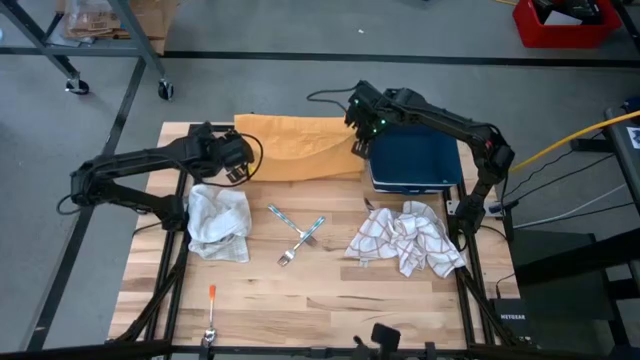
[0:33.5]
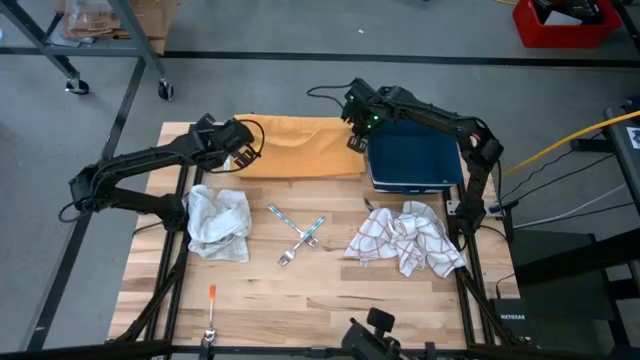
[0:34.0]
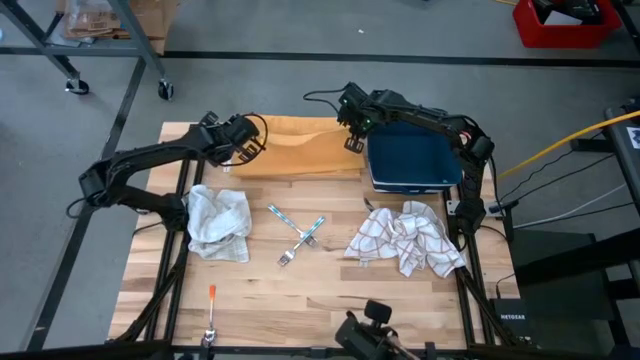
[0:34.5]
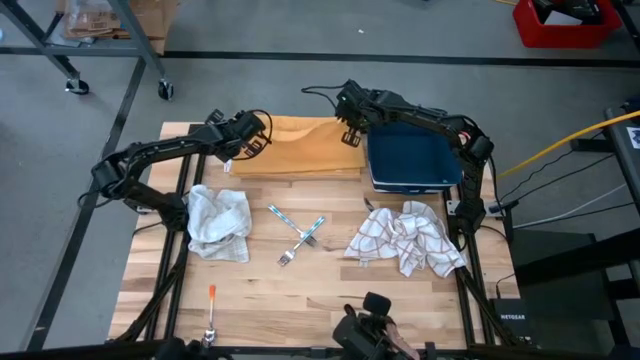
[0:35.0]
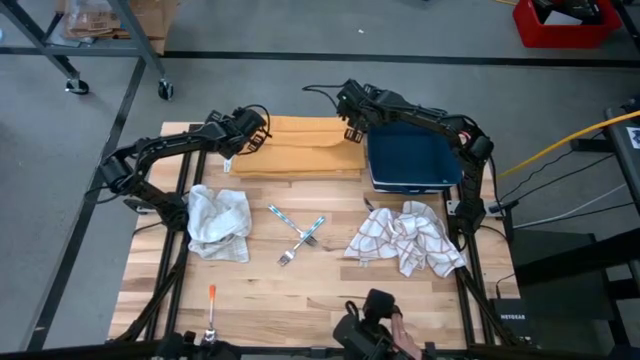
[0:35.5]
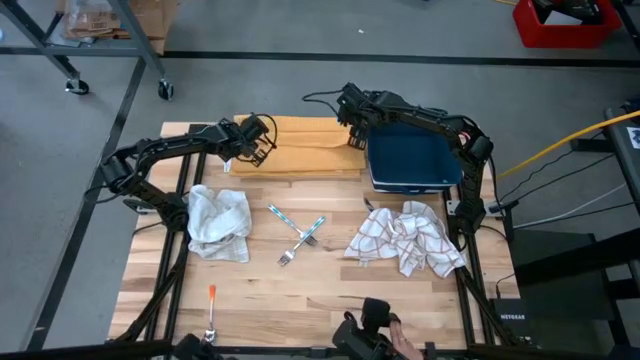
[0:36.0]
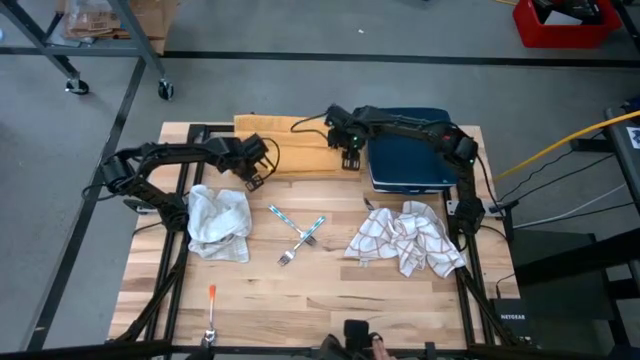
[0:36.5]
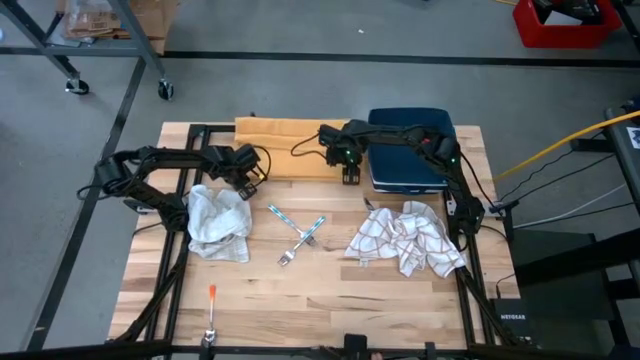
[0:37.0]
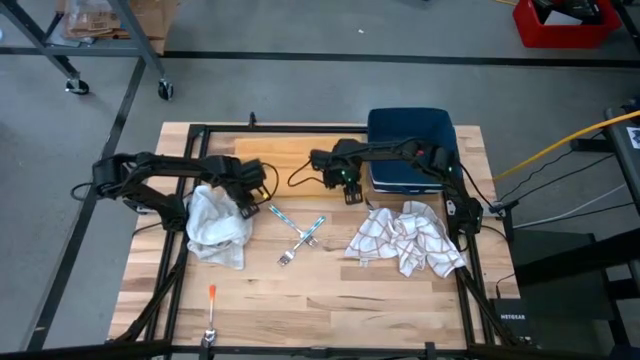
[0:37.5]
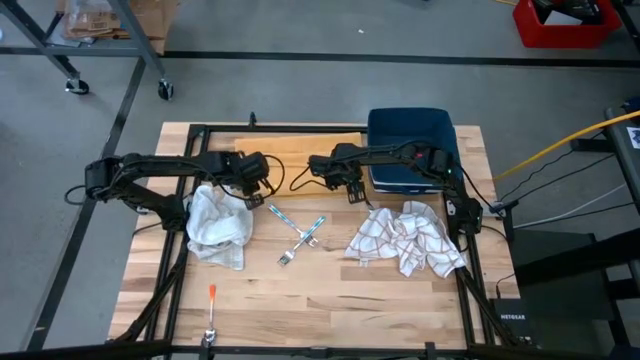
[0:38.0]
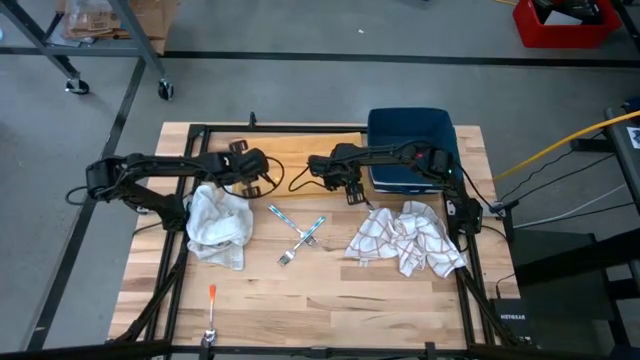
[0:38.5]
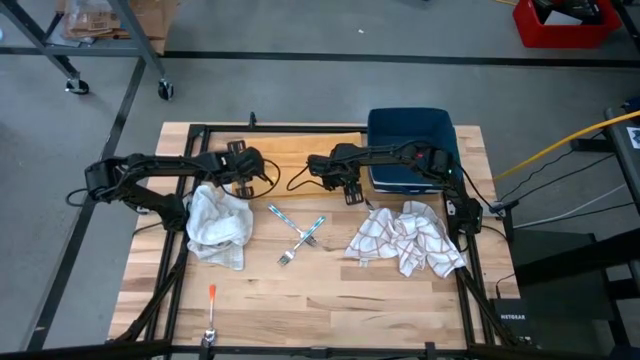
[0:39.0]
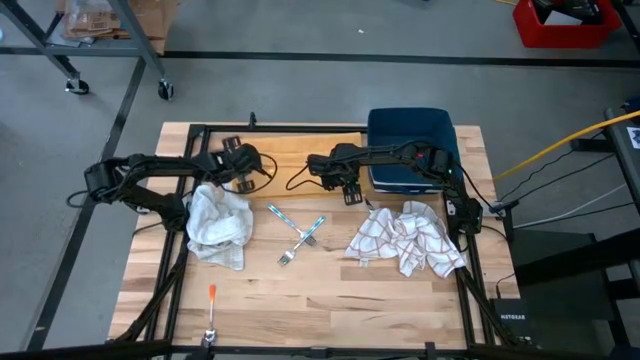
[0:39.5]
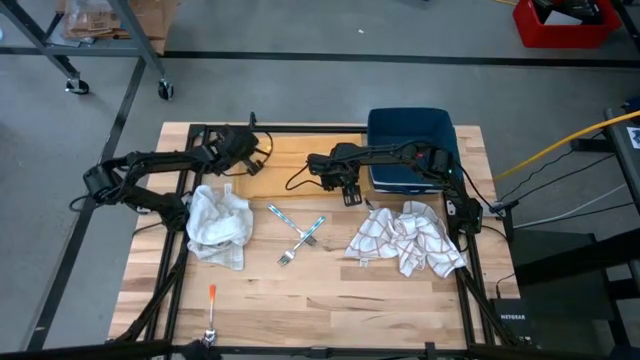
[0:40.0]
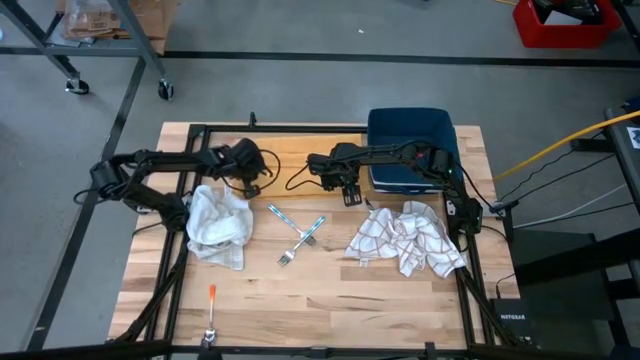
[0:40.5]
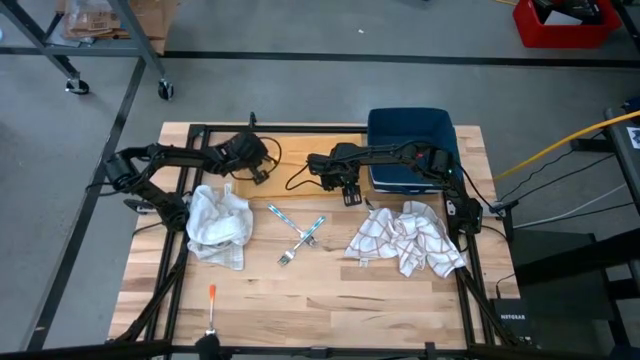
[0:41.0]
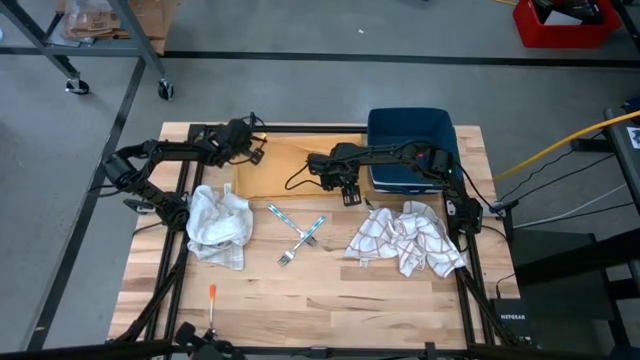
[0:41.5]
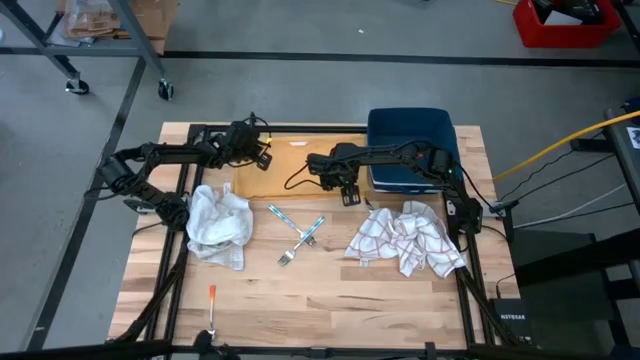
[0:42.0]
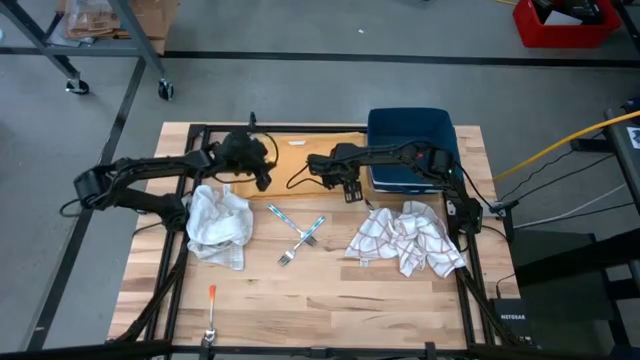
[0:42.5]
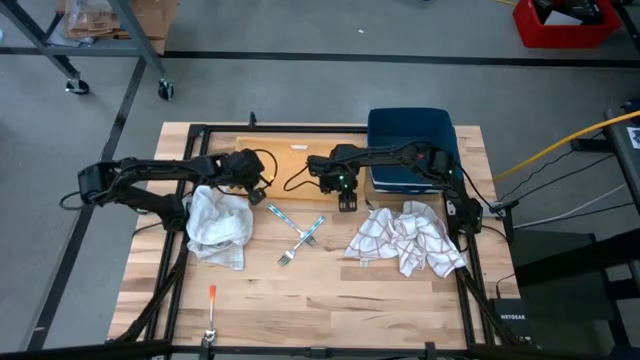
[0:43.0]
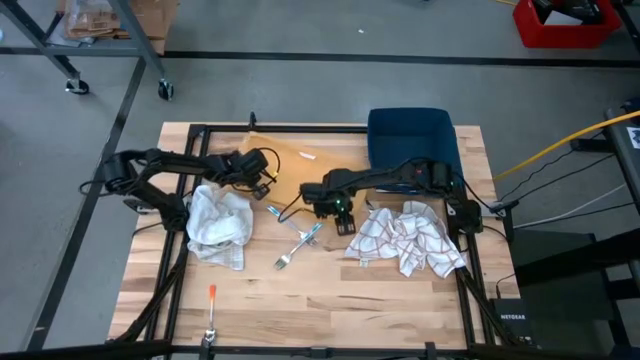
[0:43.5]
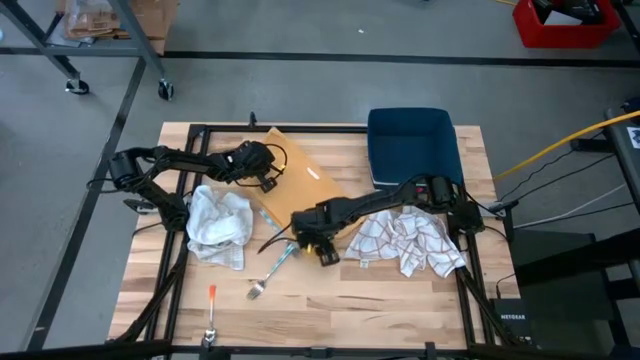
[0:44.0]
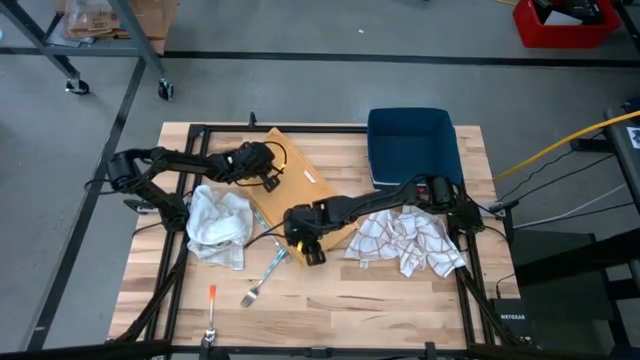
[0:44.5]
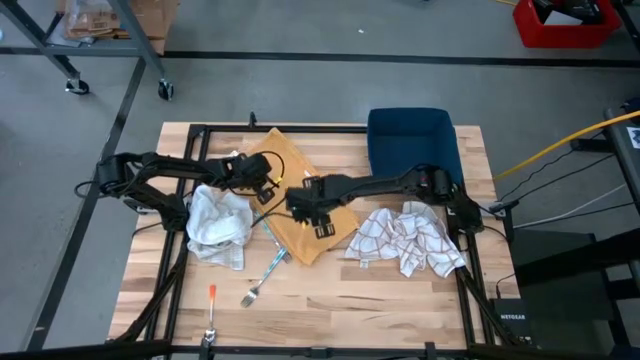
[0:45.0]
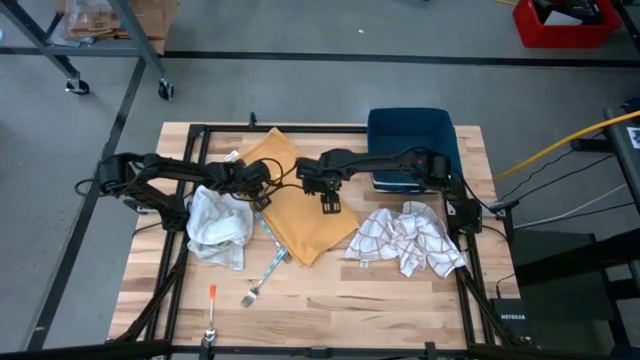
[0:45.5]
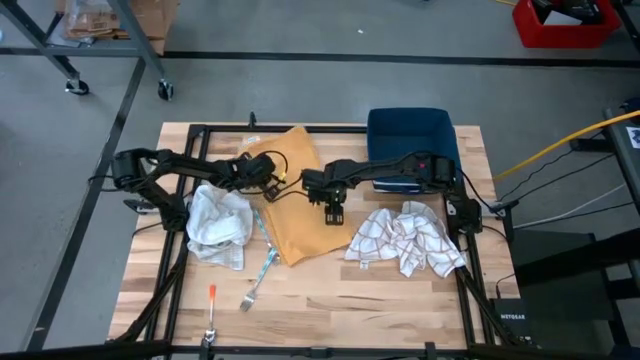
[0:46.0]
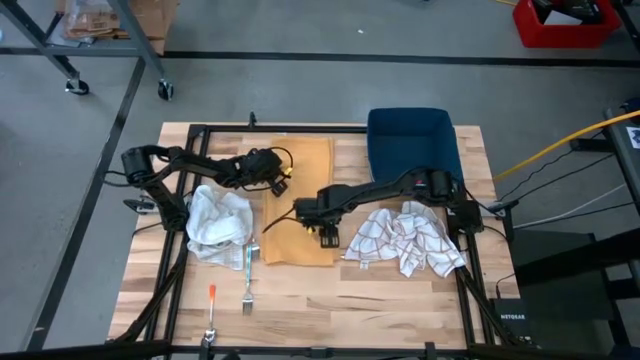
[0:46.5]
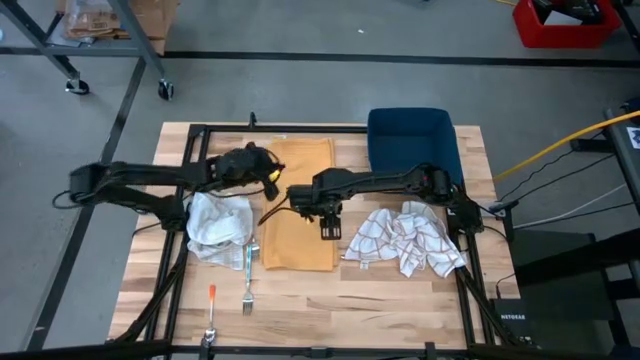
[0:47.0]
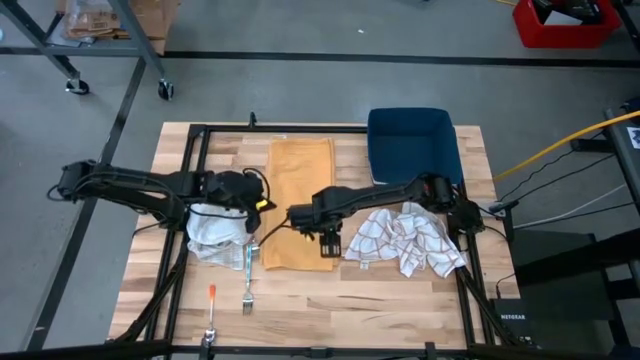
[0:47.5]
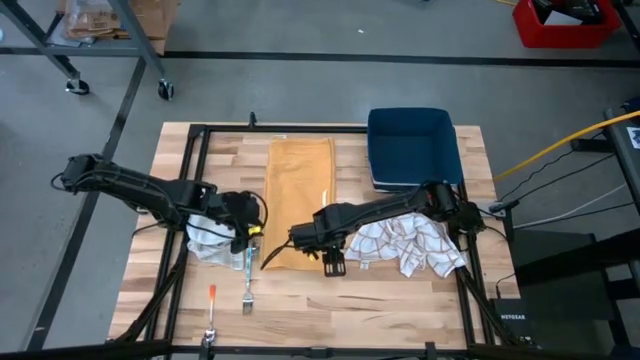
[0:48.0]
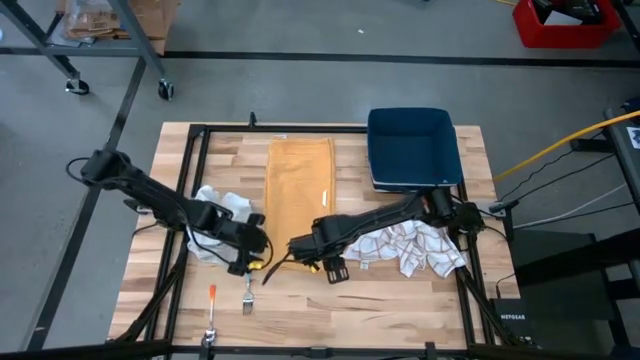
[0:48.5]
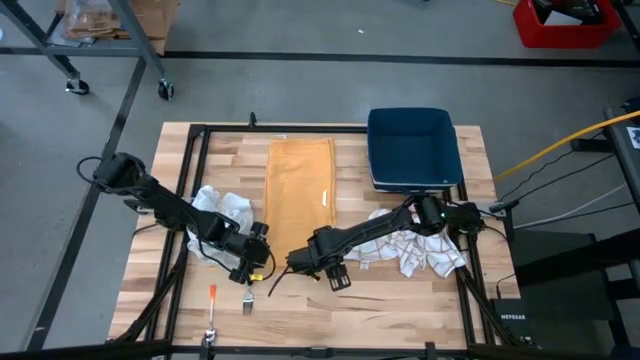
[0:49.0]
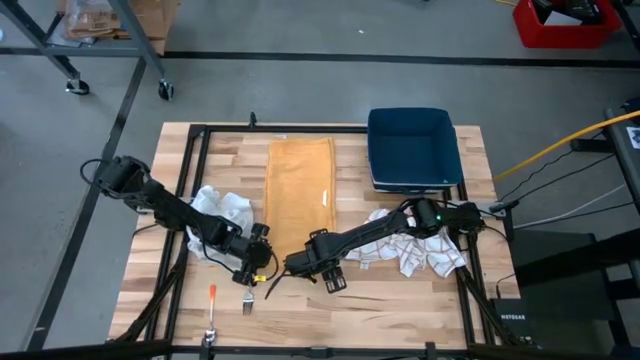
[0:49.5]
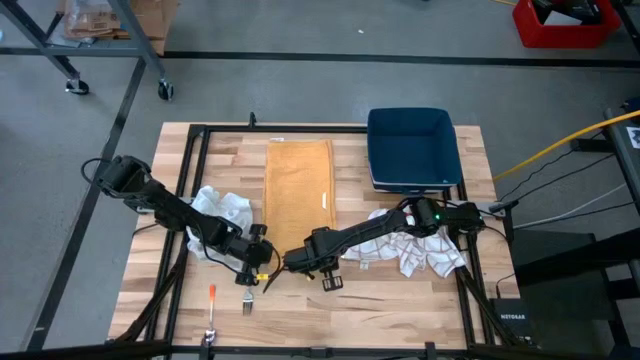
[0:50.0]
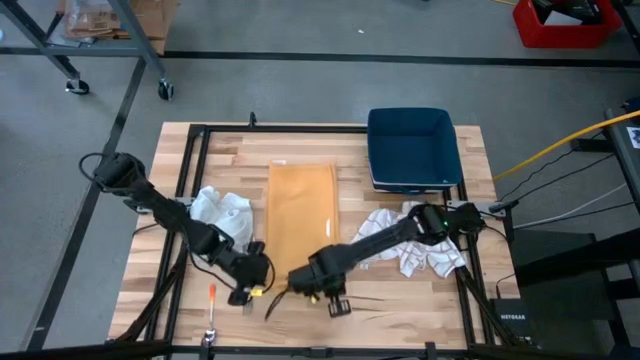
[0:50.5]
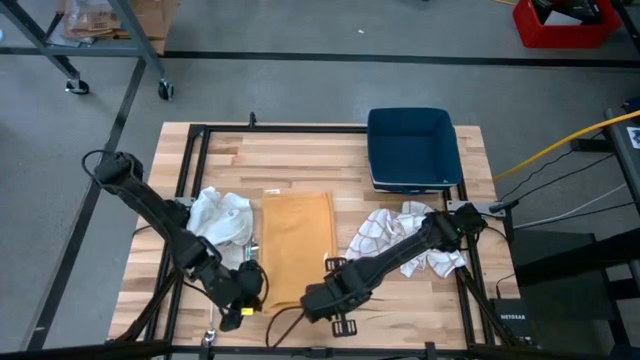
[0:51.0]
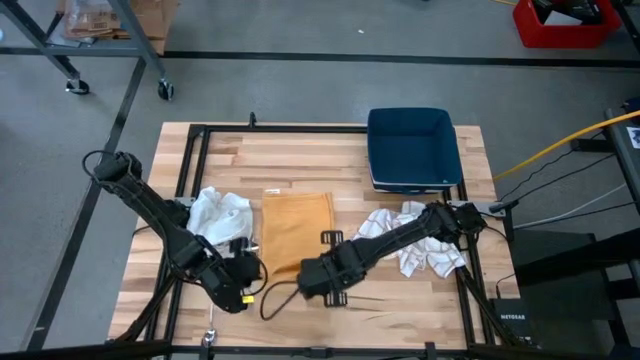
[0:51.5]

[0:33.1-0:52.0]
Task: Fold towel
Fold the yellow towel
